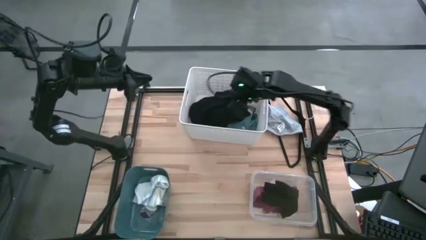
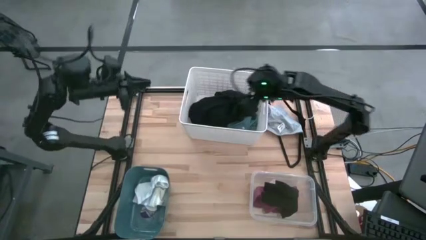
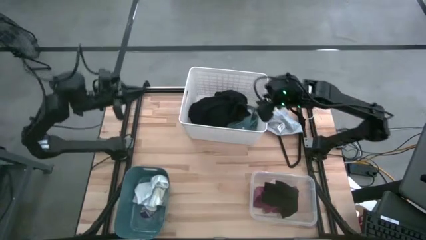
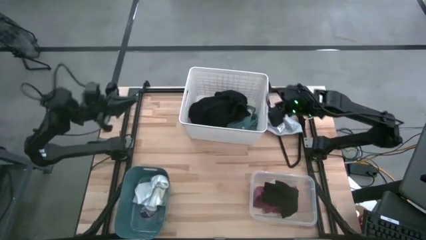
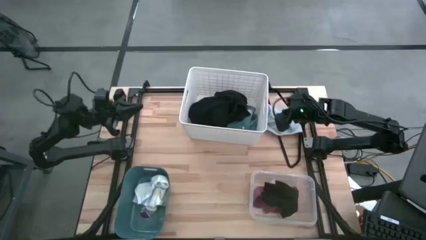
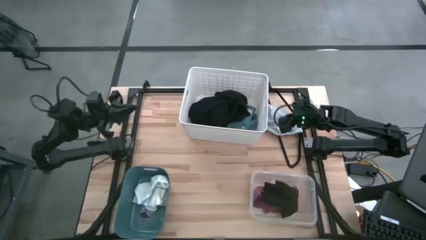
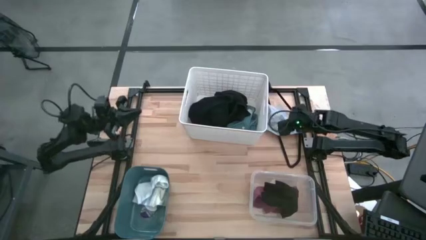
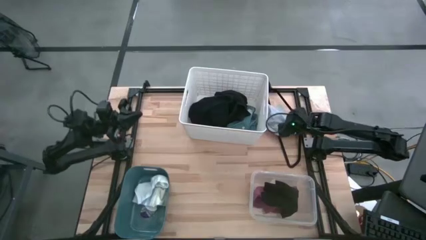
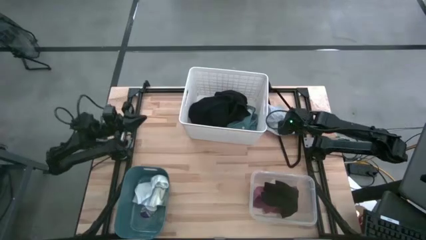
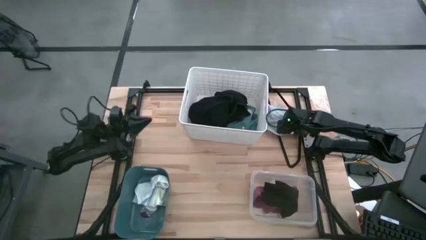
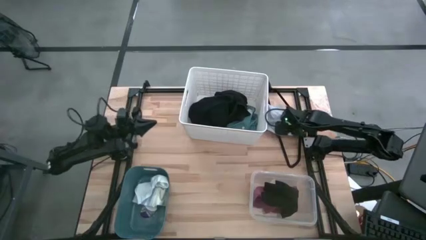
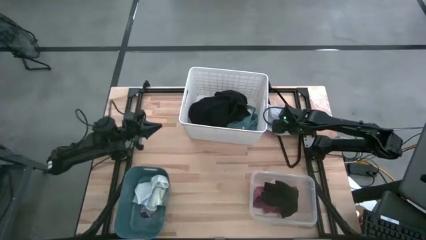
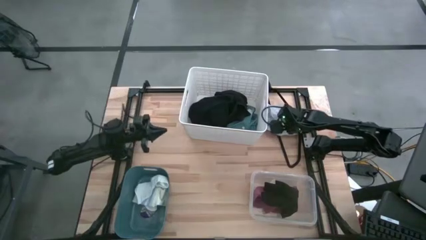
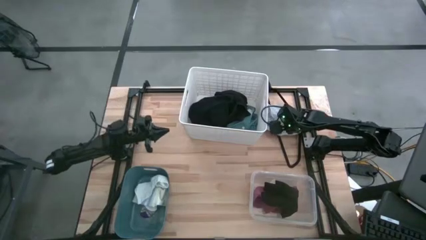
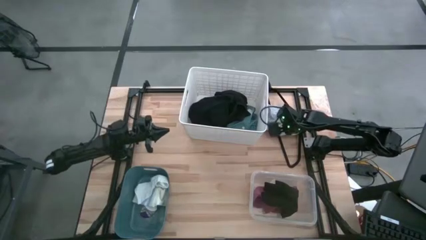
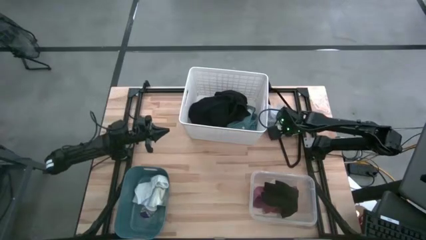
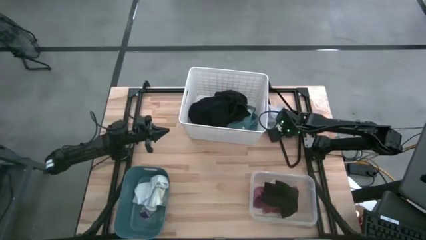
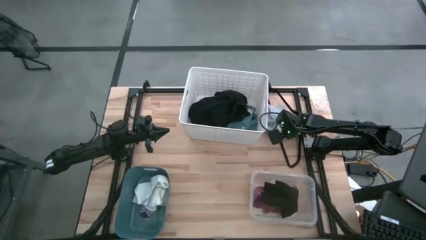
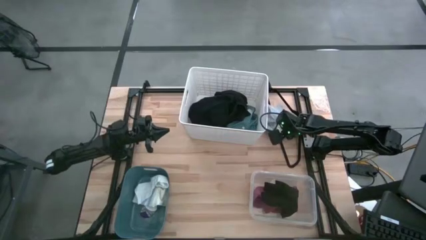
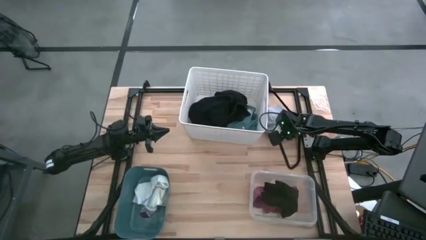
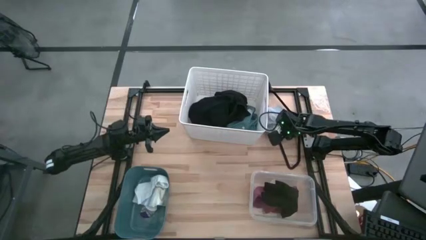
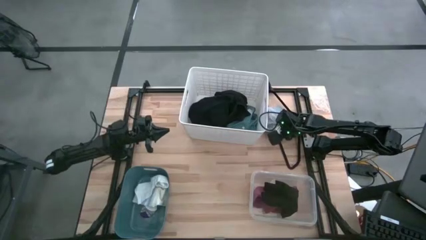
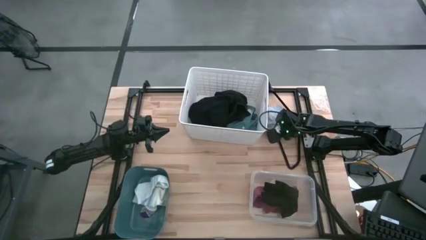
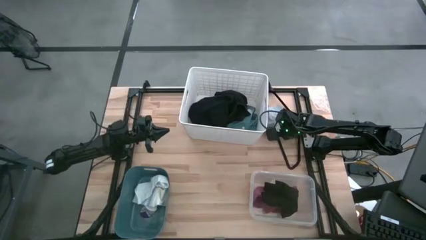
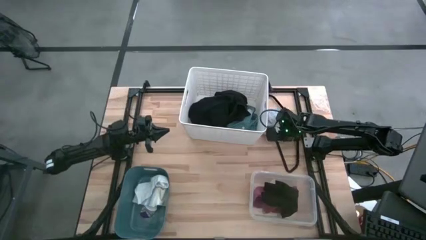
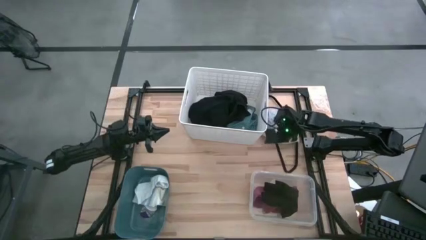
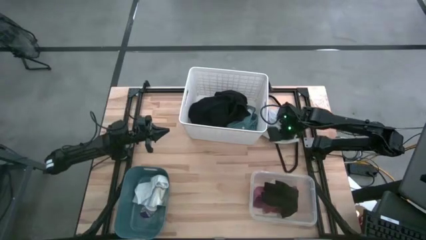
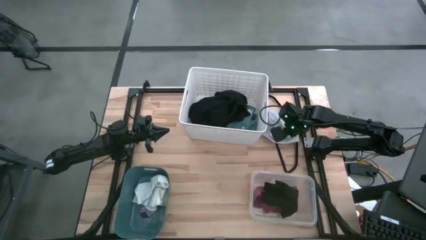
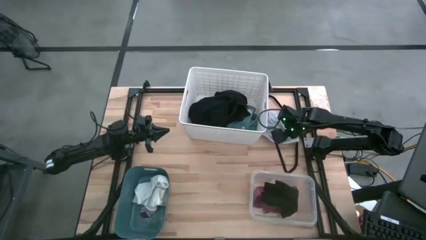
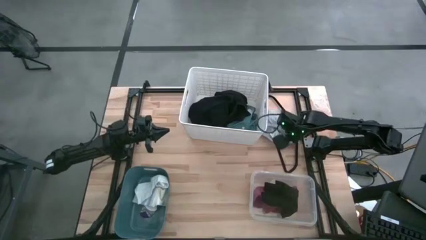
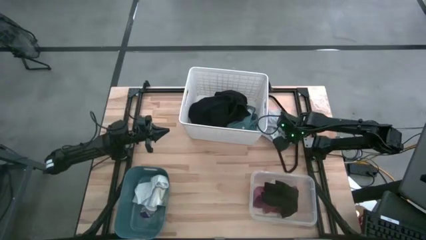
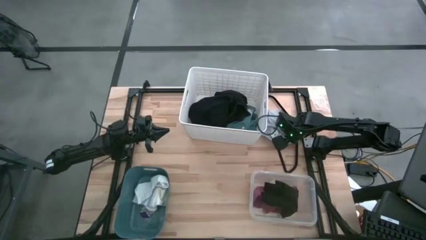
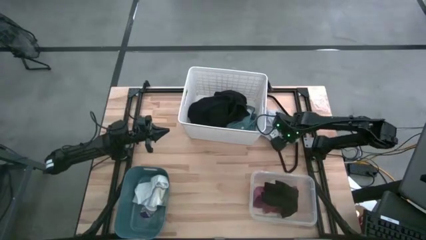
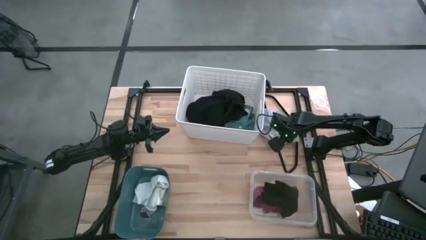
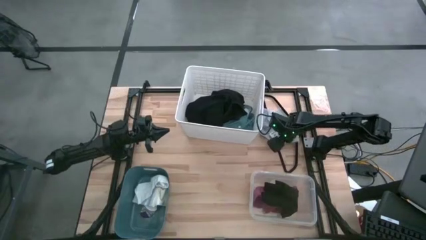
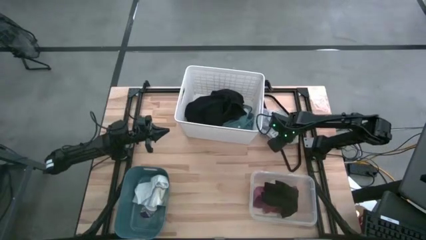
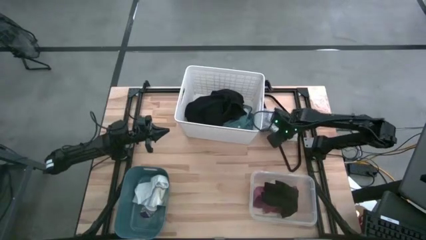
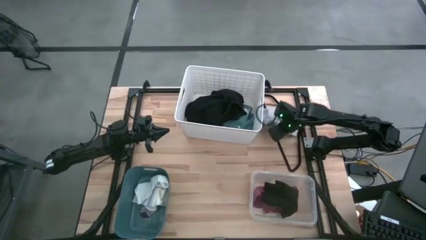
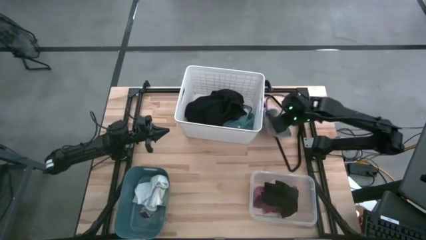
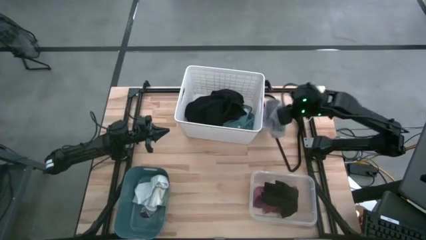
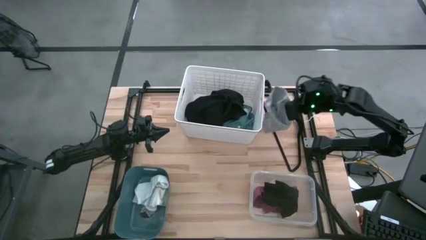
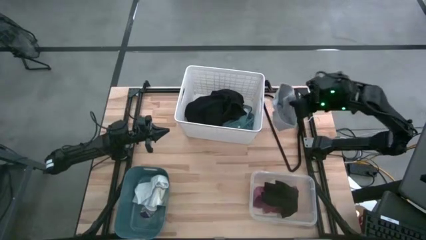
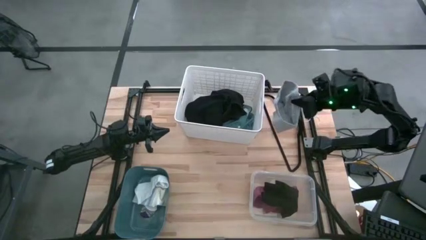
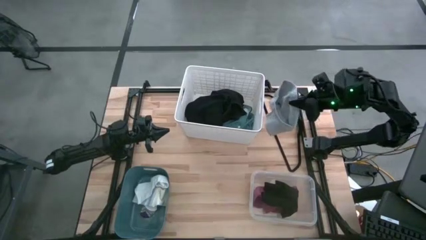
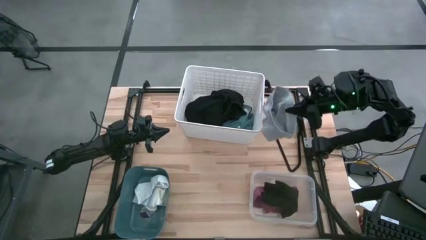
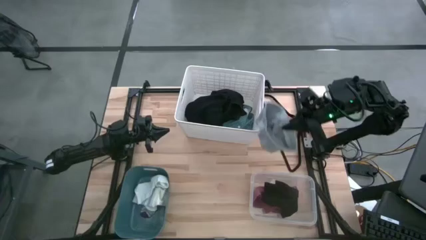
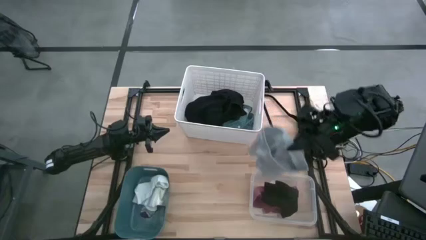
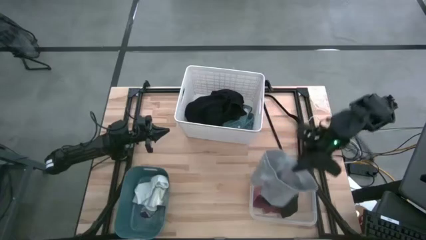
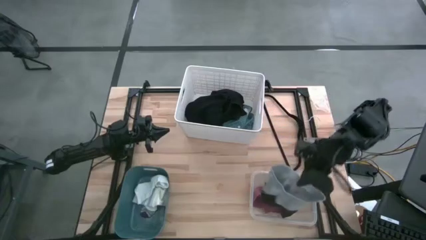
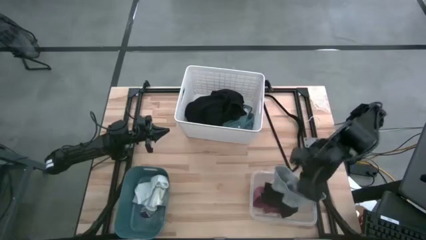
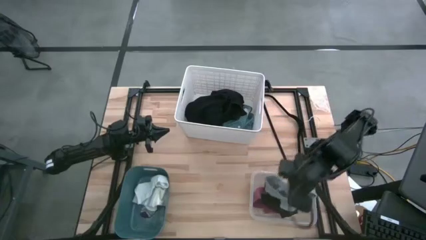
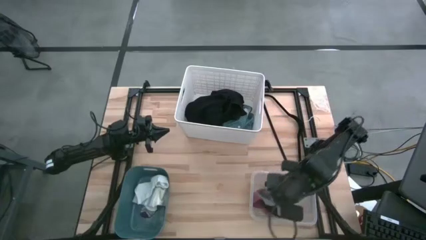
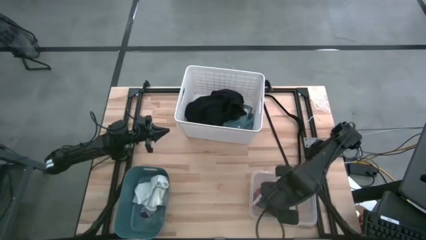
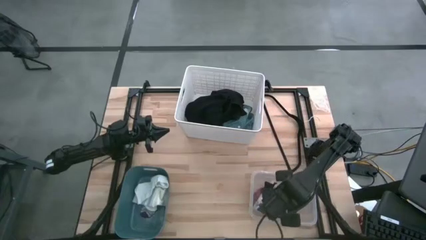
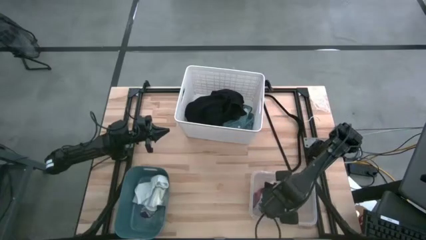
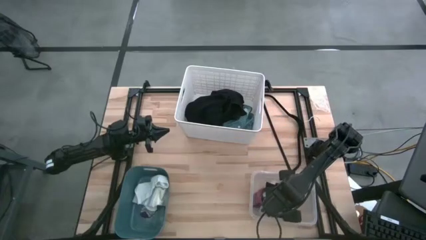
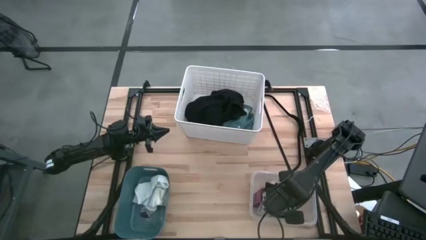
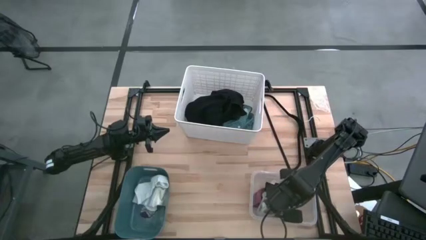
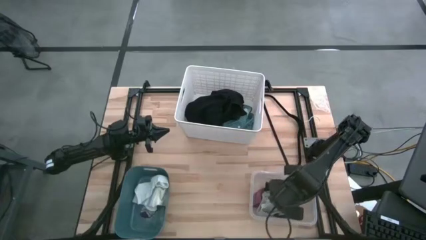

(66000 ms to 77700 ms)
Task: Pick & Place Cloths
Put the gray underwear into the transparent bin

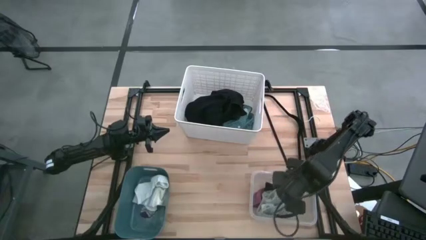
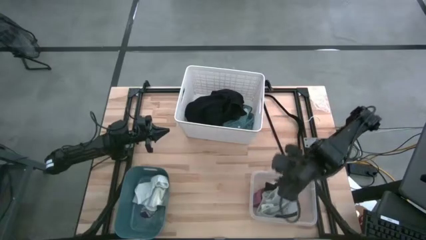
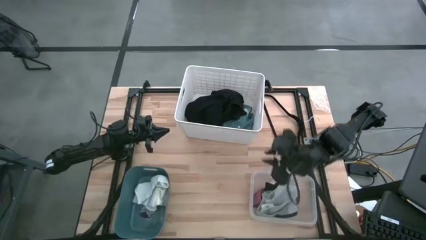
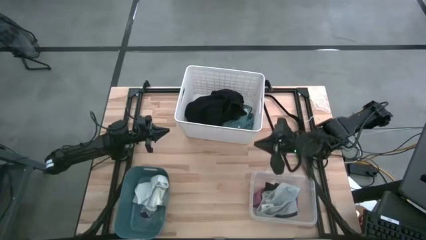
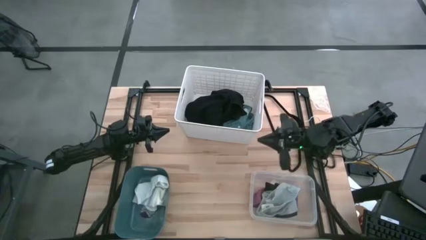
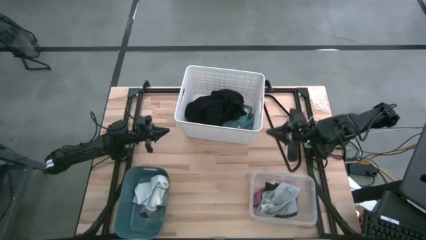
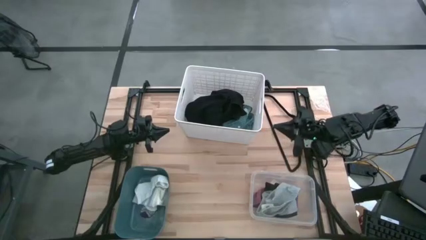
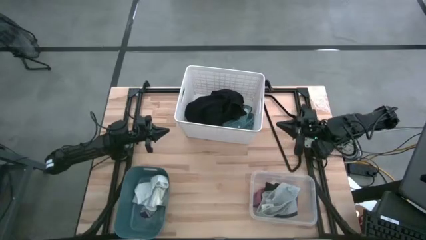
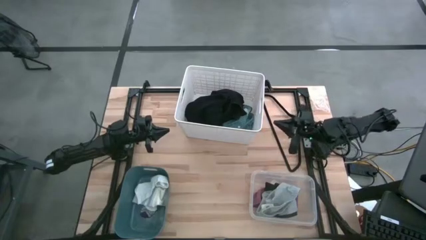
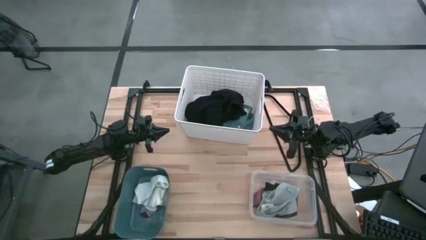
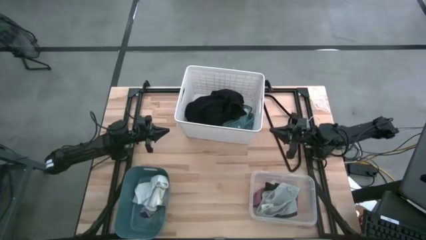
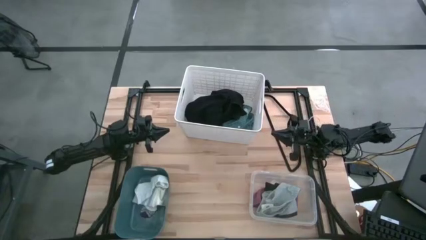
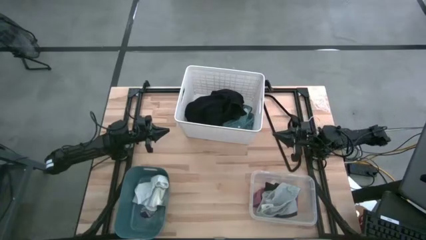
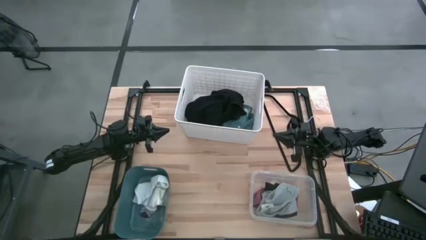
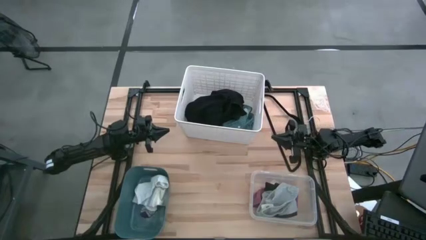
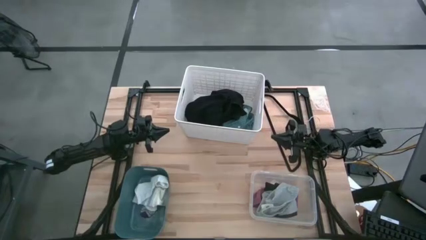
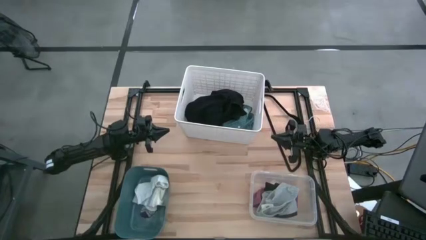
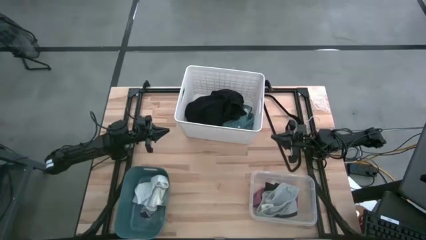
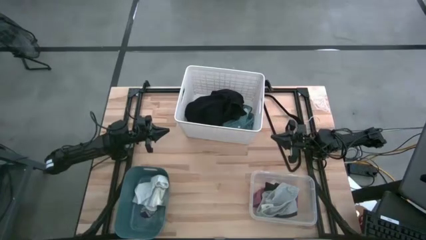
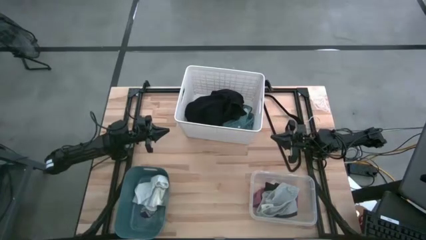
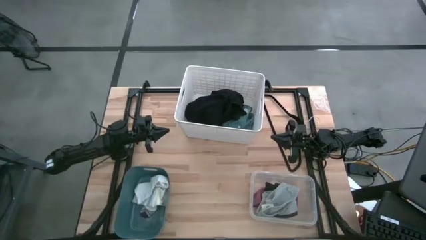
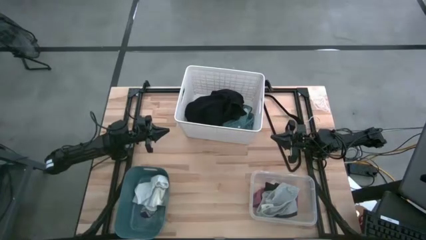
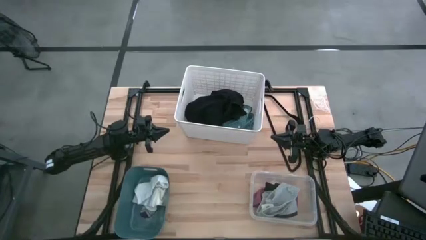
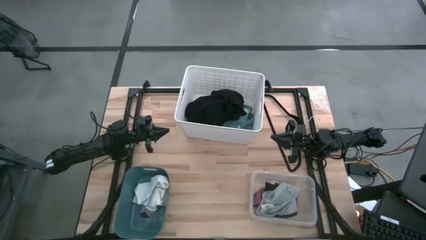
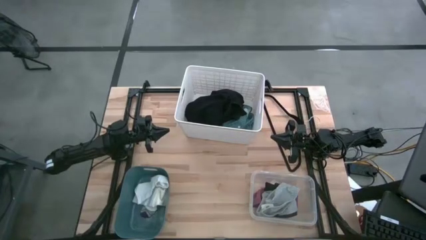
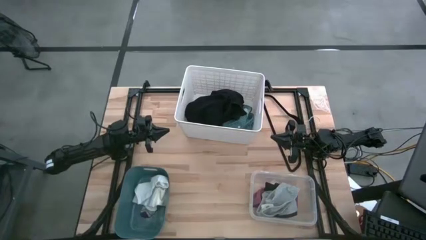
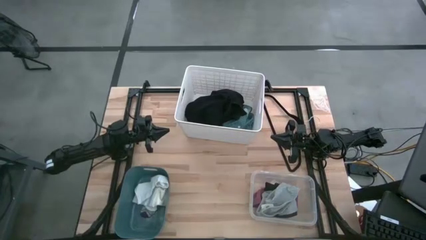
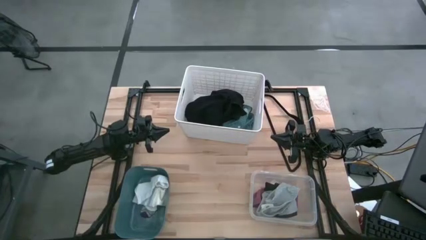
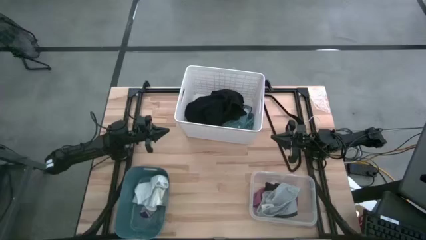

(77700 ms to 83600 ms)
Return to Home Position
